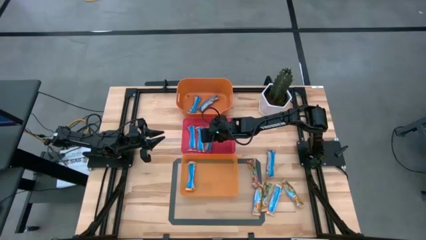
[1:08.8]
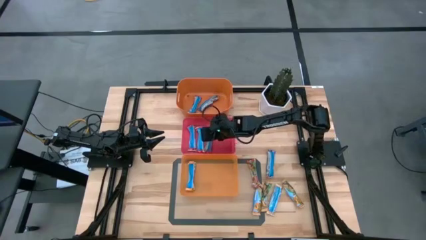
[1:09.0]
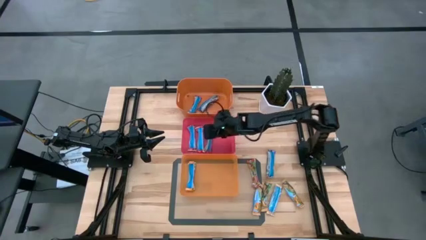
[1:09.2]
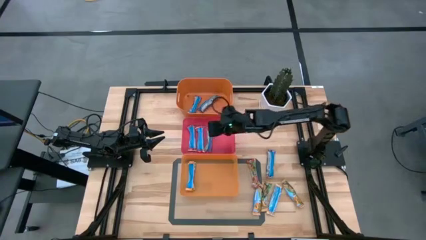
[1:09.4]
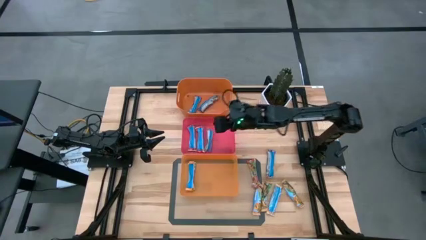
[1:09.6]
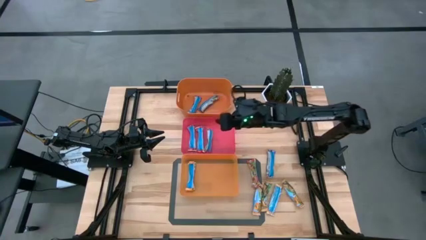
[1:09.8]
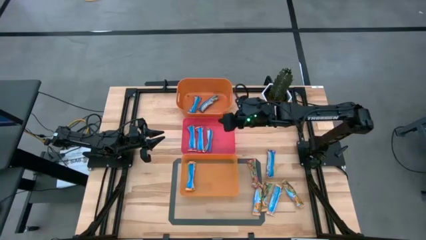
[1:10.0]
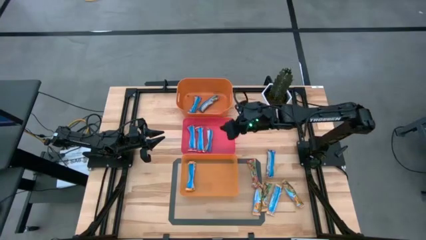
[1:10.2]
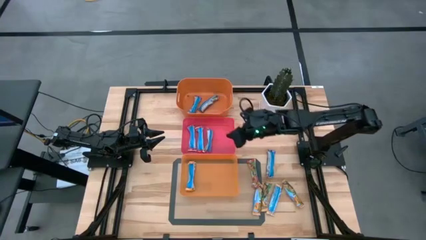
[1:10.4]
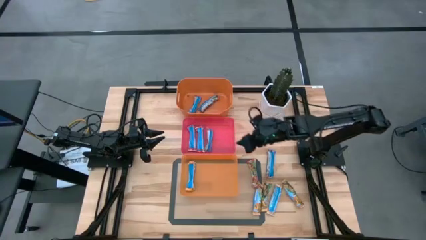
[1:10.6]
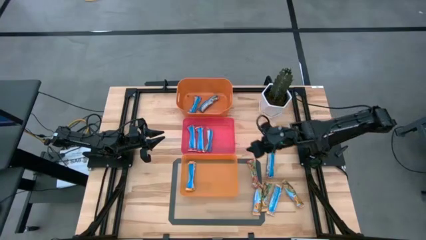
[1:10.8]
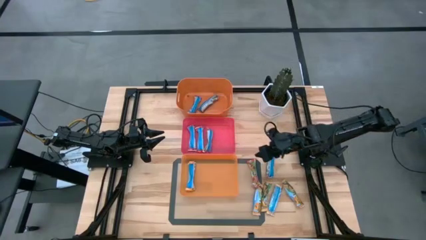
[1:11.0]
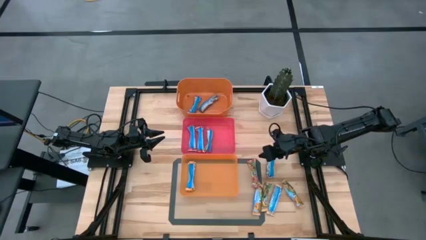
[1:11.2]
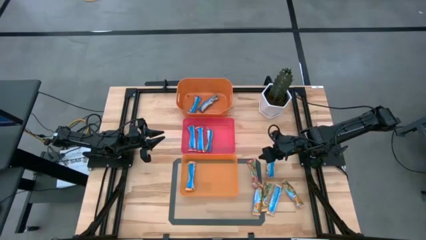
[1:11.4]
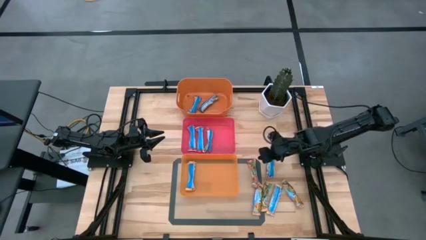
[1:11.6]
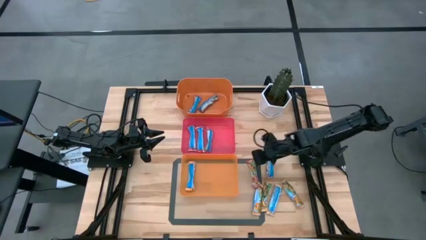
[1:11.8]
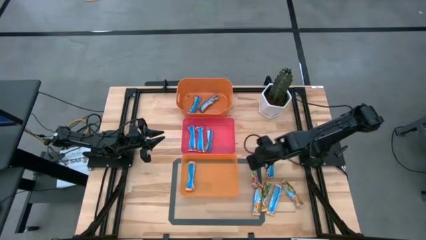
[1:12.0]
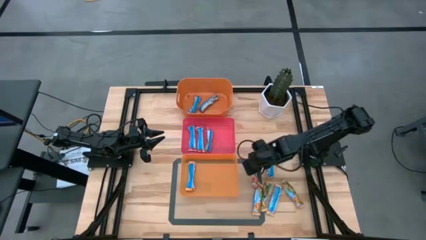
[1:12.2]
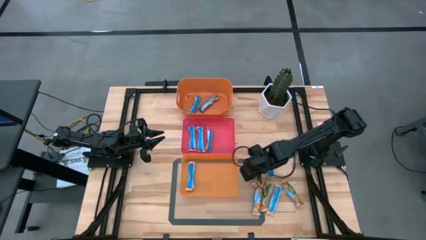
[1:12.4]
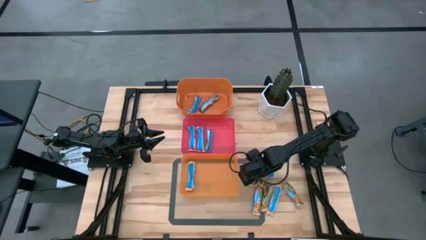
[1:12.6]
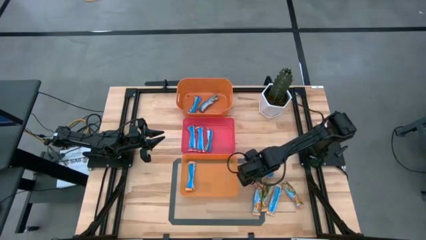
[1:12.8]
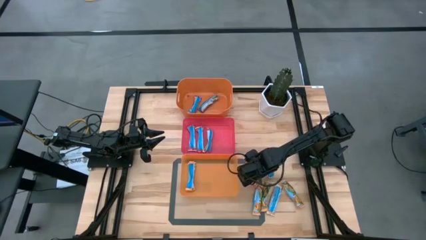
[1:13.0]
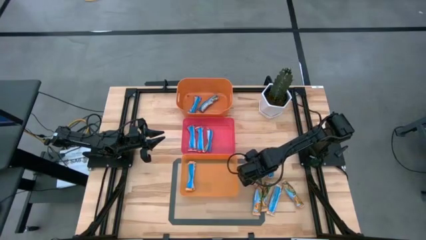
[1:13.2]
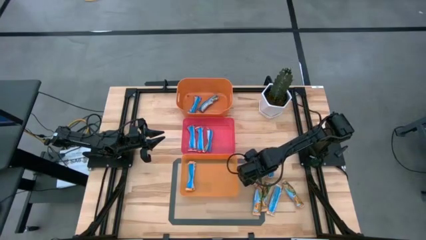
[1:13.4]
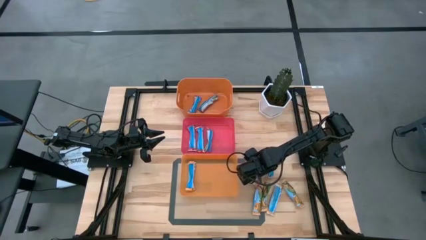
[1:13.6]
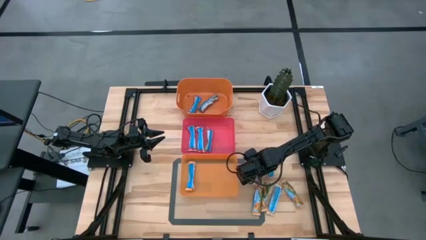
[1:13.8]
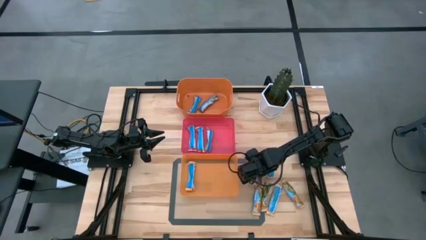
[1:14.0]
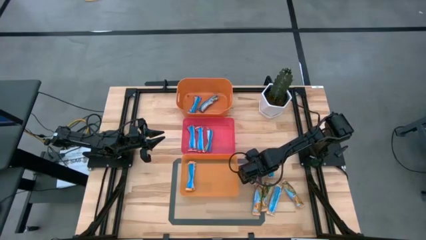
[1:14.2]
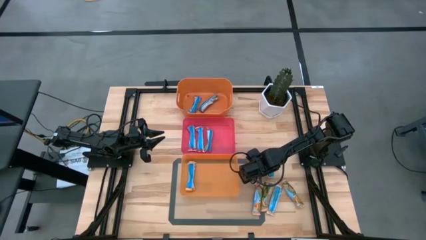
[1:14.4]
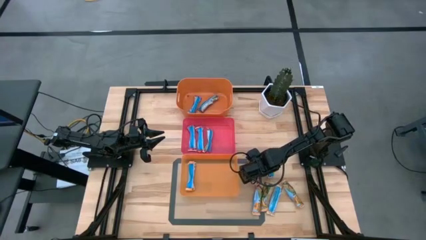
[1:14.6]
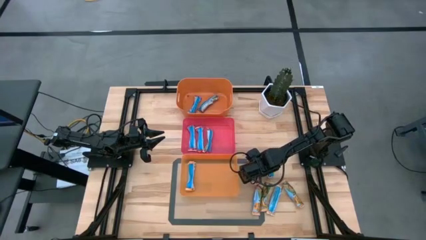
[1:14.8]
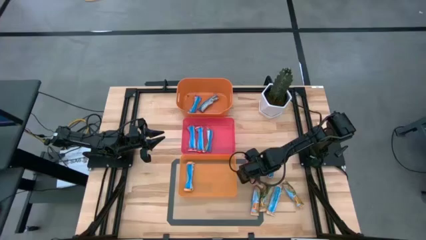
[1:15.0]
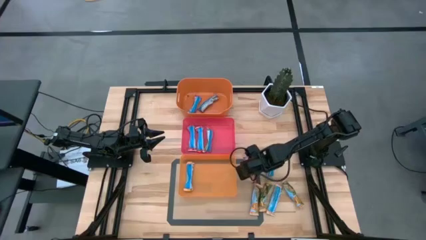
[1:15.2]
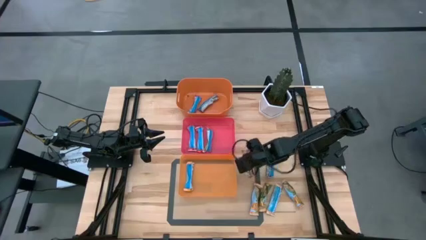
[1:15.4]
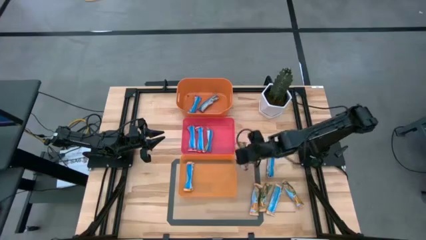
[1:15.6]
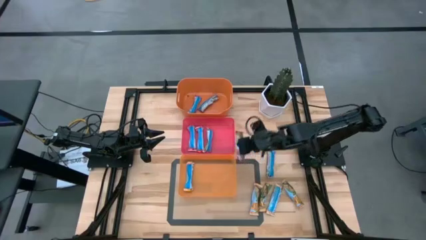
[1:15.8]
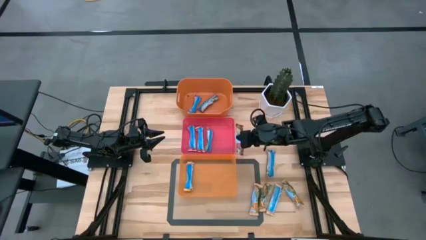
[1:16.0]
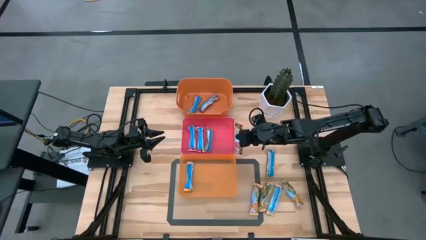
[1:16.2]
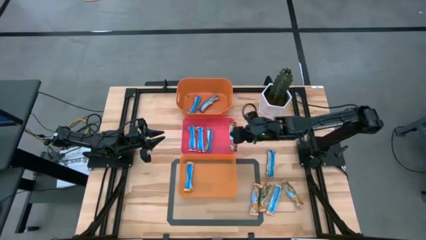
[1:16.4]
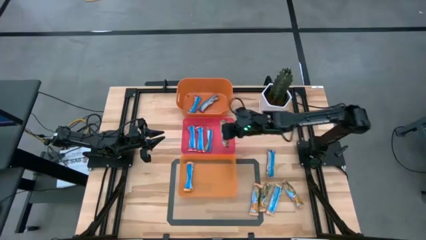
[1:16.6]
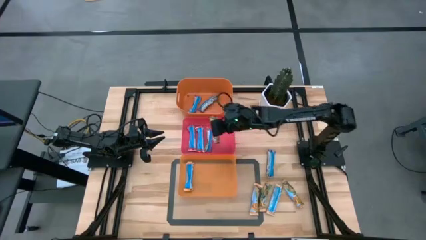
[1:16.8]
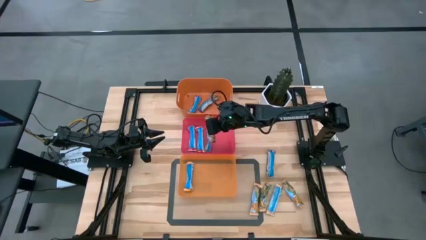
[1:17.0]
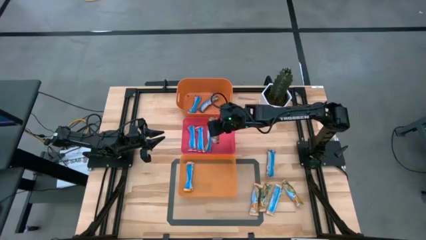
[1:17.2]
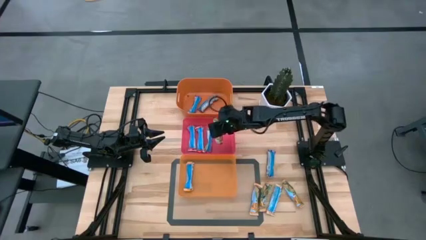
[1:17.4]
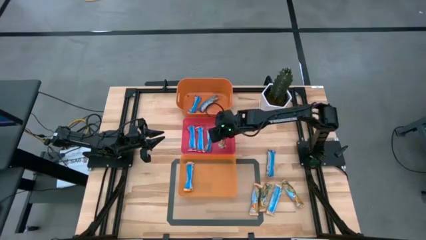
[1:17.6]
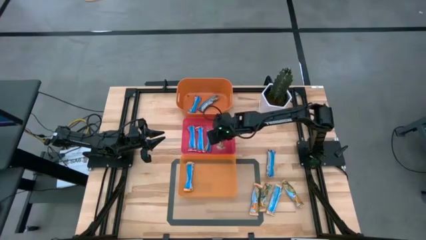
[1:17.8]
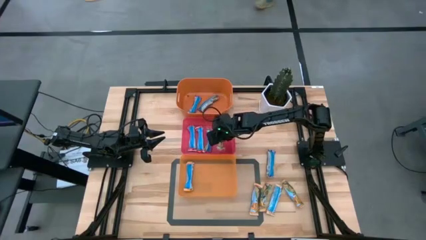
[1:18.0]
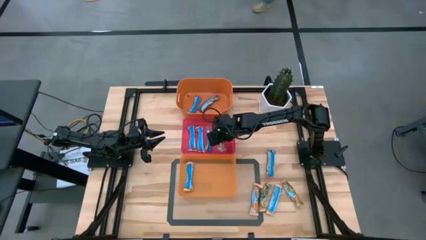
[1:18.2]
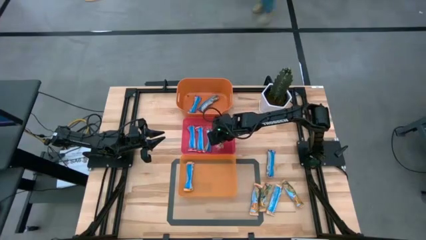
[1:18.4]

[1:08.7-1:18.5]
Task: Pick and place Granola Bars by type
Put the red granola bar into the red bin

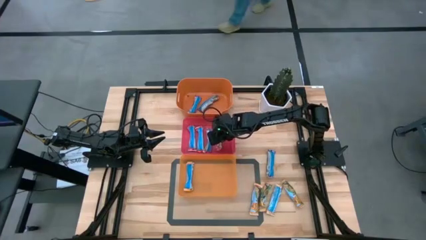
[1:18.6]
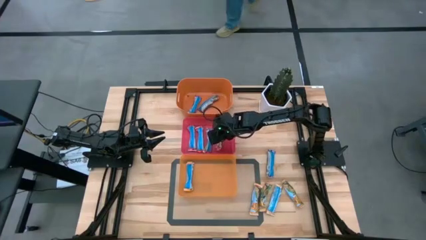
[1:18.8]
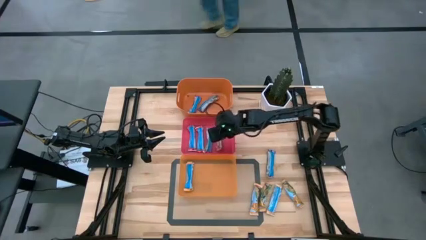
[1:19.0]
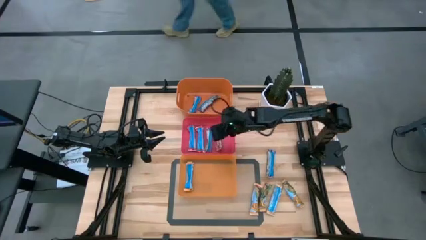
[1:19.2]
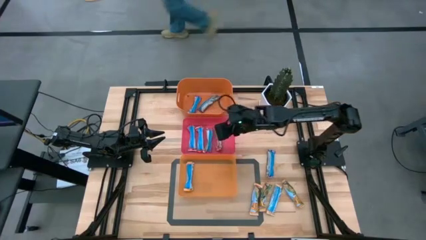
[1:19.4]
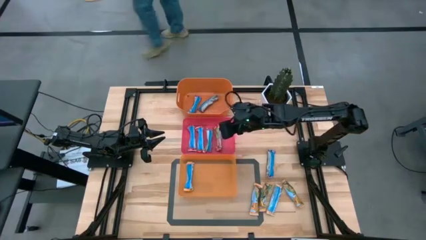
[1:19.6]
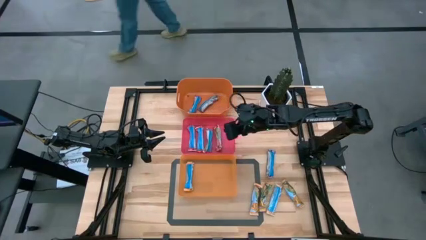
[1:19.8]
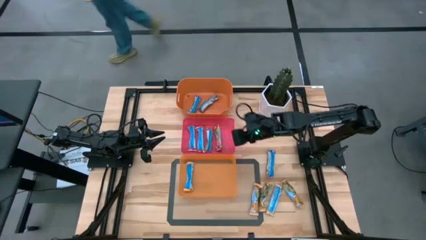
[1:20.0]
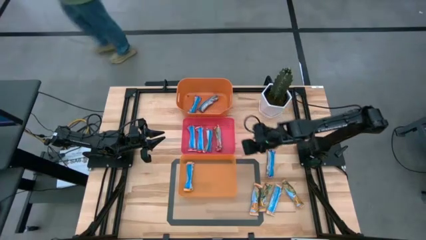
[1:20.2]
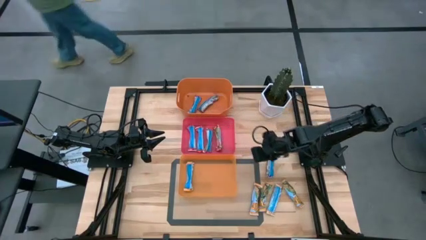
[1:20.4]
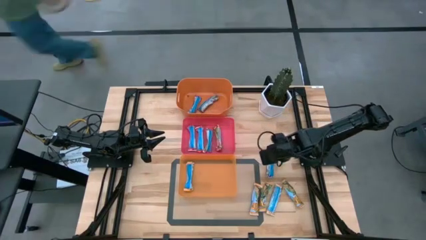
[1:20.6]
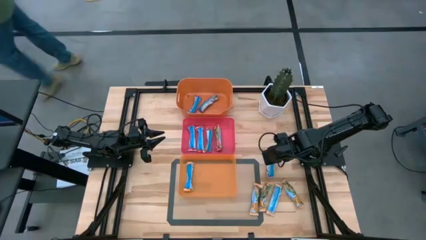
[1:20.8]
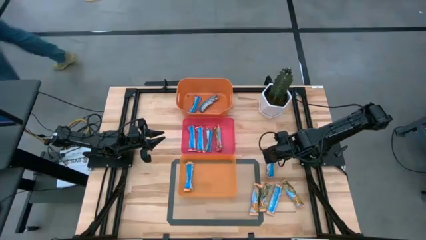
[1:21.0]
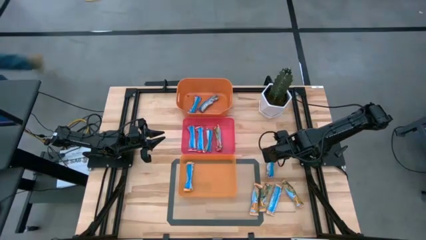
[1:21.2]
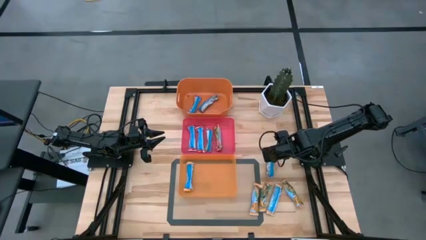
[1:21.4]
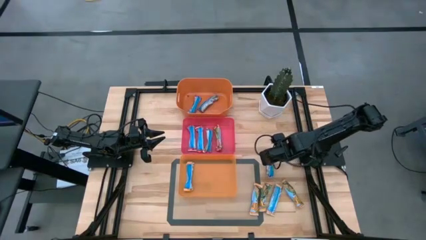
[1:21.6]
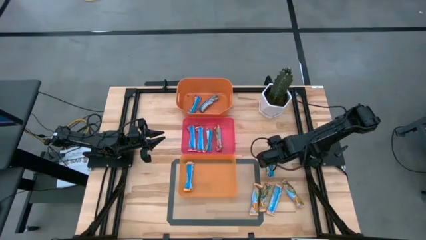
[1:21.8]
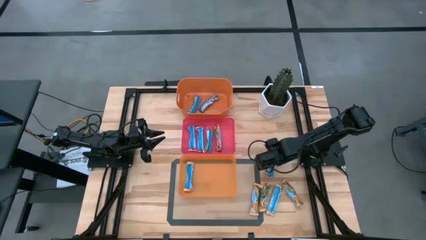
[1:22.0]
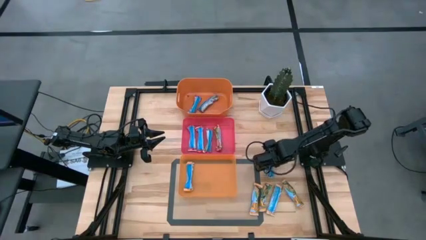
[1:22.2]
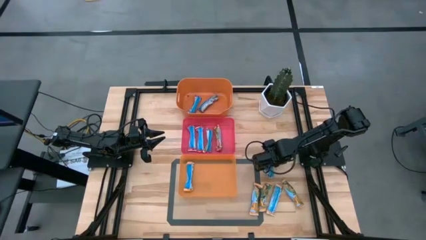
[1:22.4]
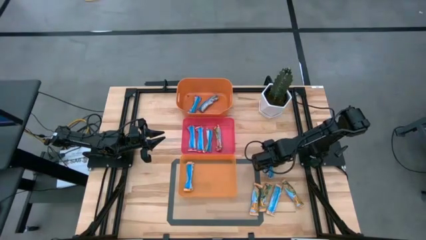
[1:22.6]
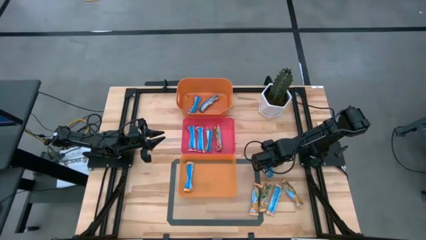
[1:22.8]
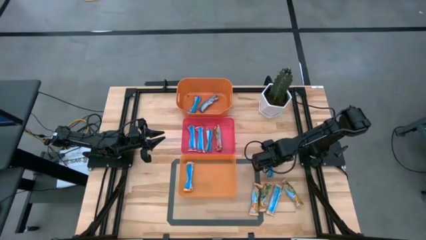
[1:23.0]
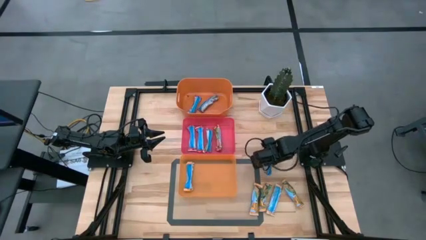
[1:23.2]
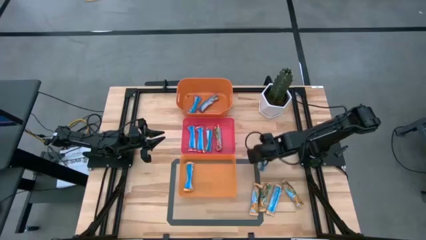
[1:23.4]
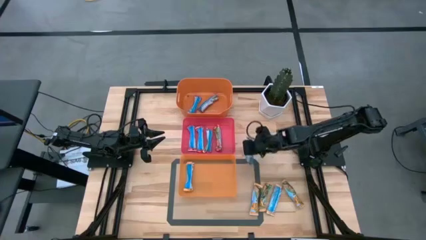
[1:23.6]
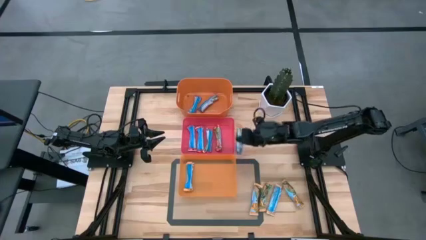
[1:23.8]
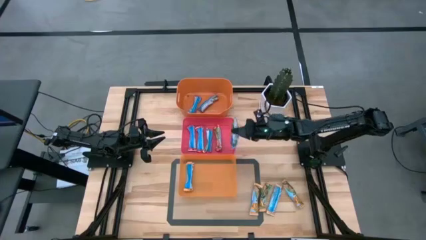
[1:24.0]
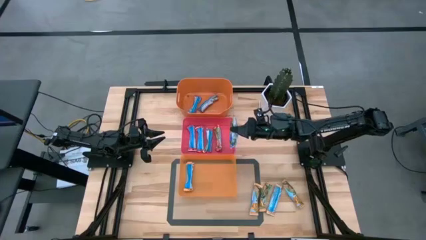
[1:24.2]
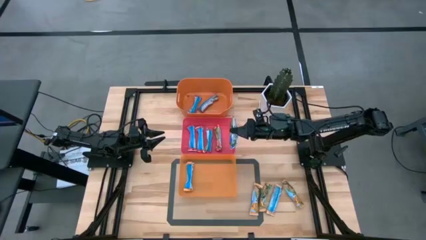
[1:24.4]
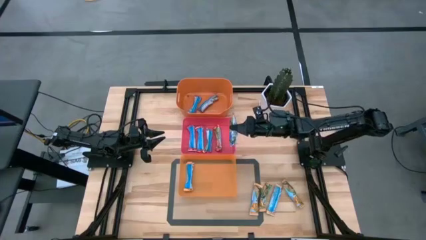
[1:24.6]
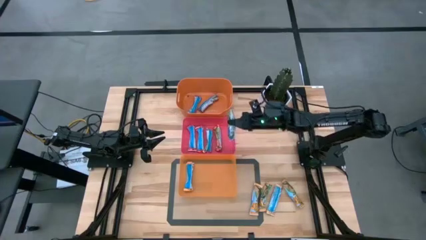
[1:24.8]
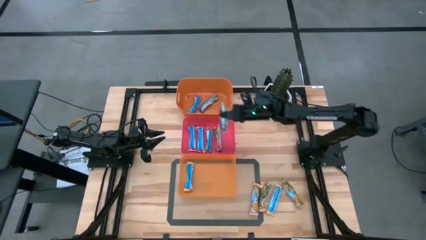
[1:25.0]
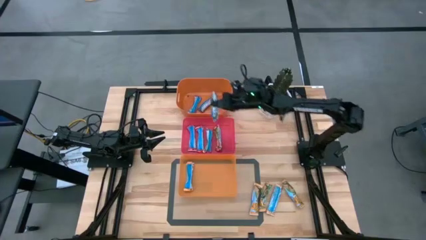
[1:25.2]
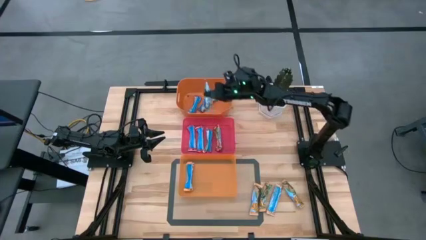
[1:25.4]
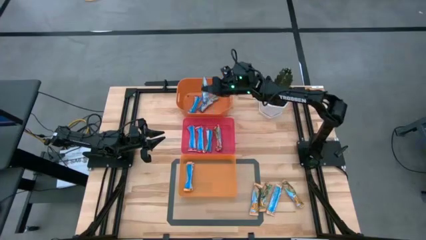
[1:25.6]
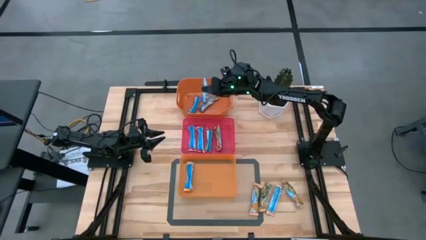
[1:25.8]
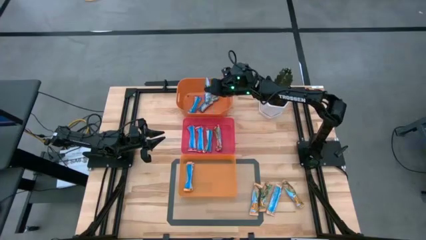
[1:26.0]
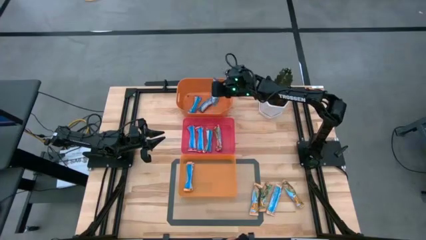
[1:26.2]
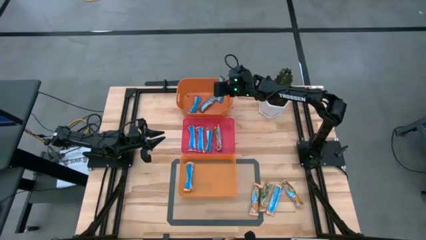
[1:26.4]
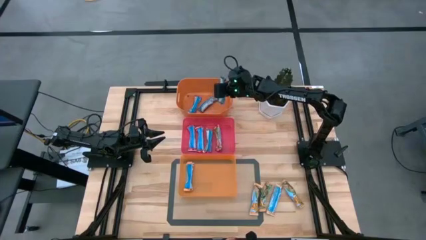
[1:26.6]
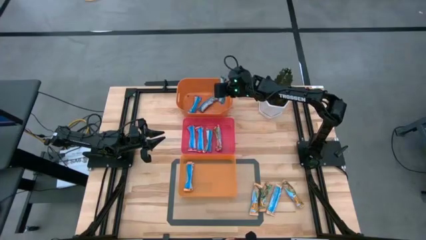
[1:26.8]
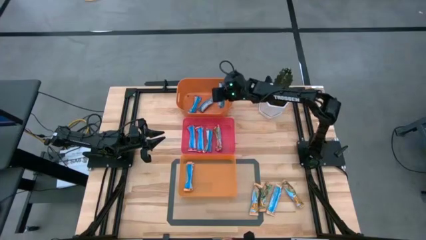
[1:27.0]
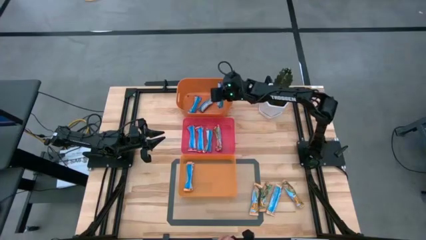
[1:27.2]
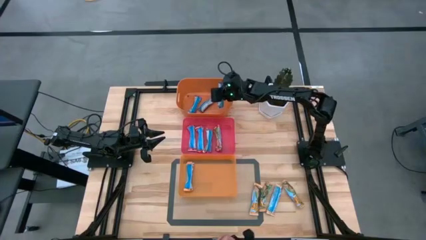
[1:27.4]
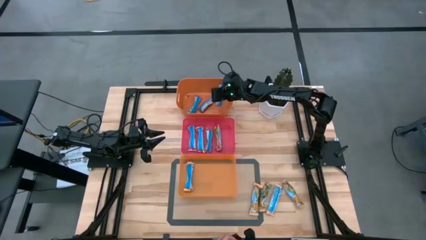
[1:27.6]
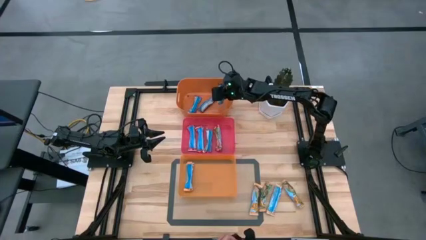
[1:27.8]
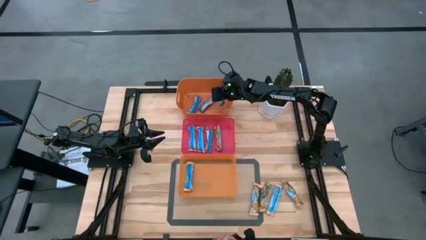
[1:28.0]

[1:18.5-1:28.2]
Put the blue granola bar into the top orange bin
